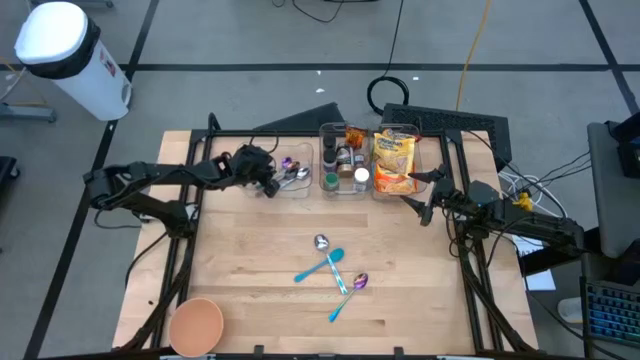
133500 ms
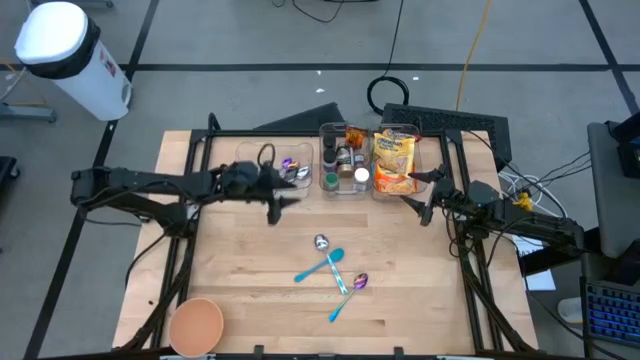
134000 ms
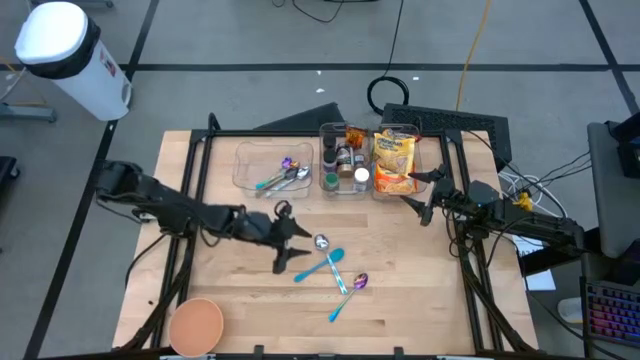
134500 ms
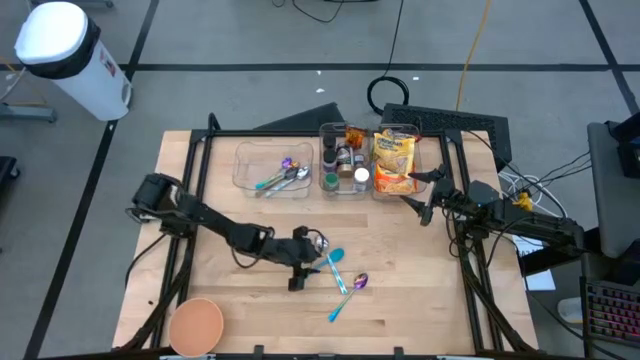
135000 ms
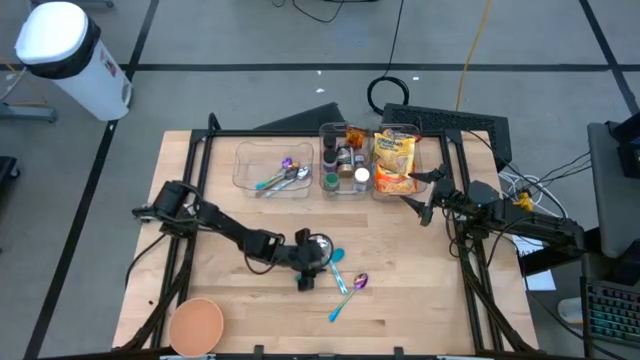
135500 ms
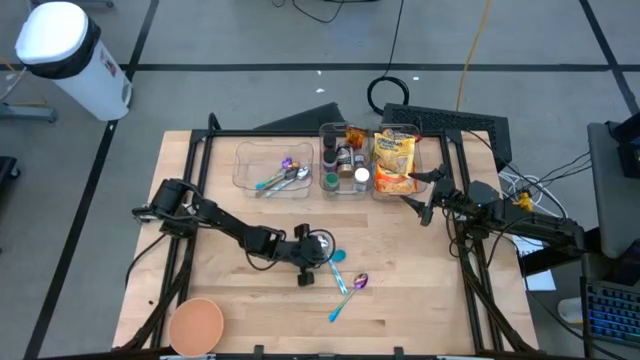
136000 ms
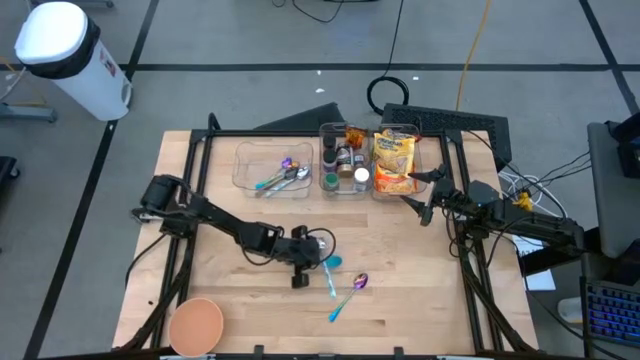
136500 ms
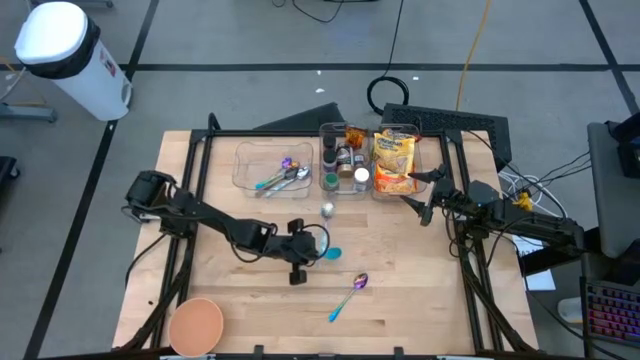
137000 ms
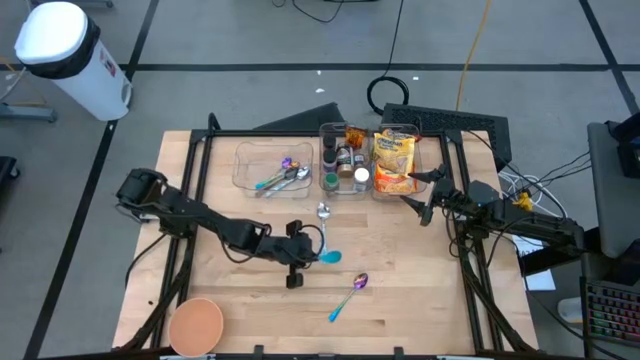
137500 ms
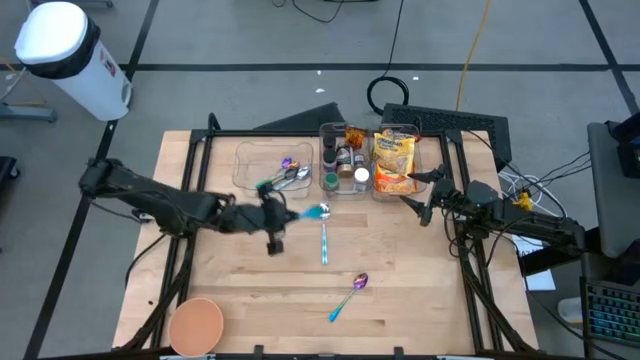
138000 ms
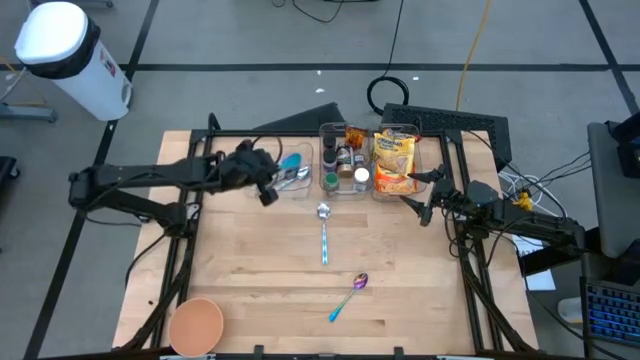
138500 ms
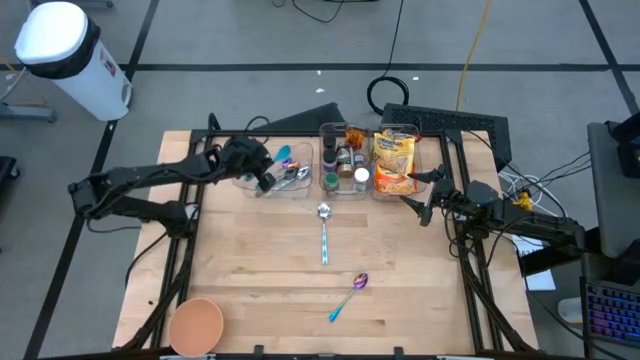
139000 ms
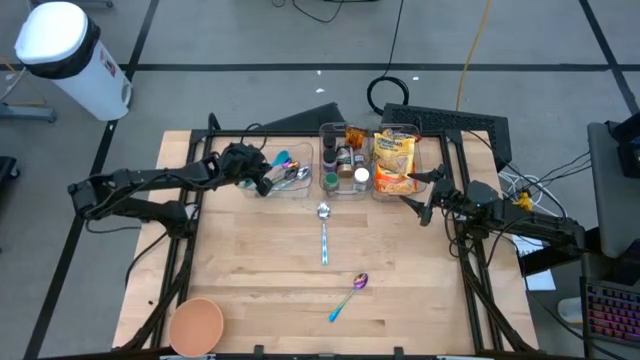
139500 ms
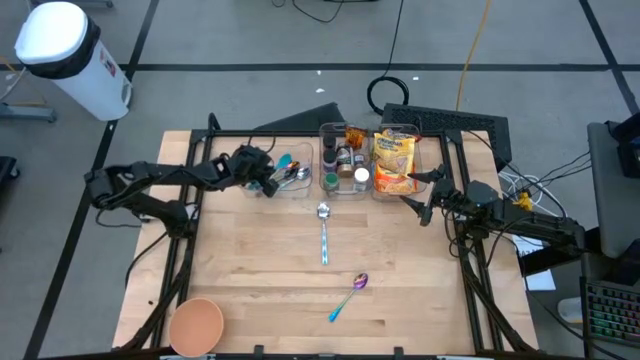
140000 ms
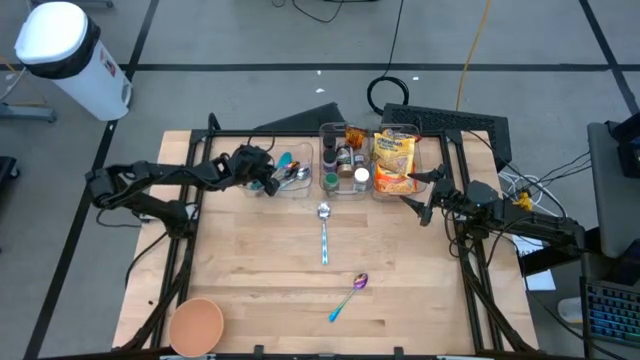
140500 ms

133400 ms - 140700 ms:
Task: Pick & Place Food Item
Put the blue spoon into the left transparent bin

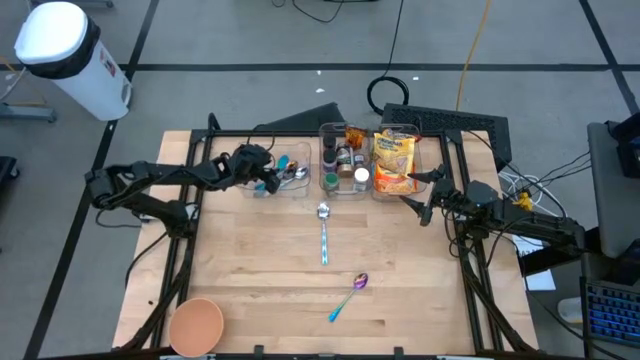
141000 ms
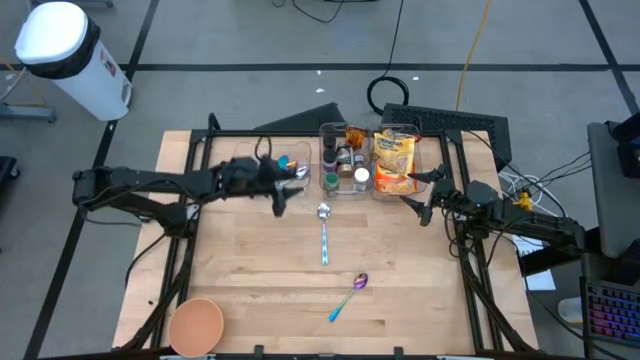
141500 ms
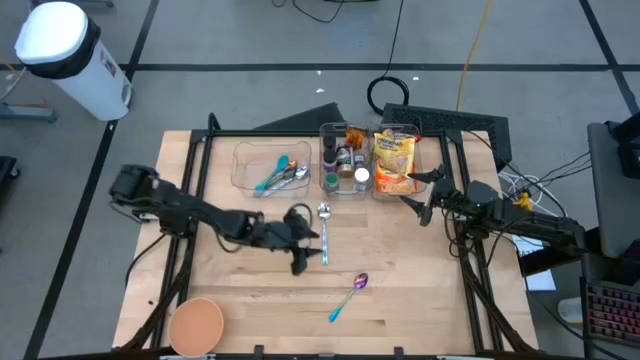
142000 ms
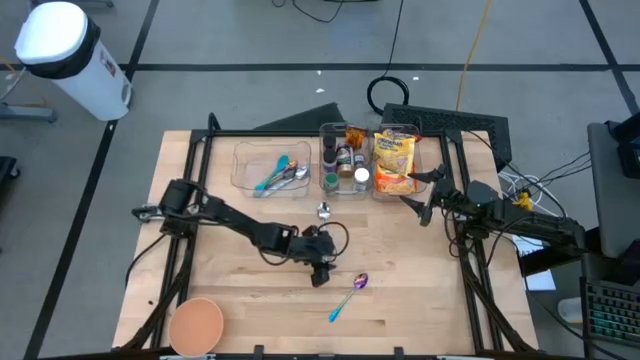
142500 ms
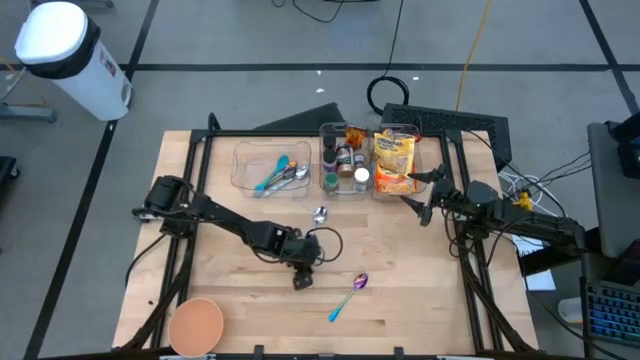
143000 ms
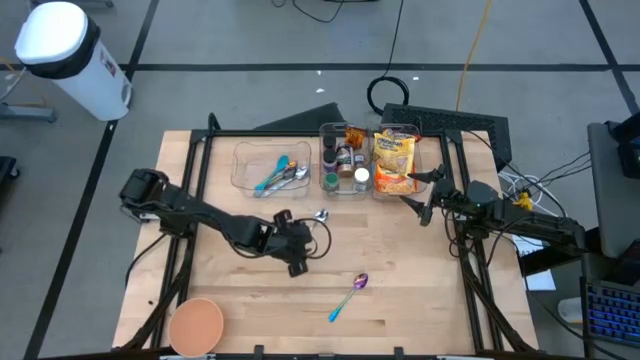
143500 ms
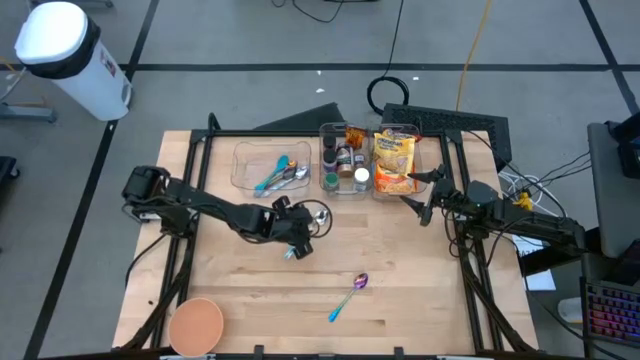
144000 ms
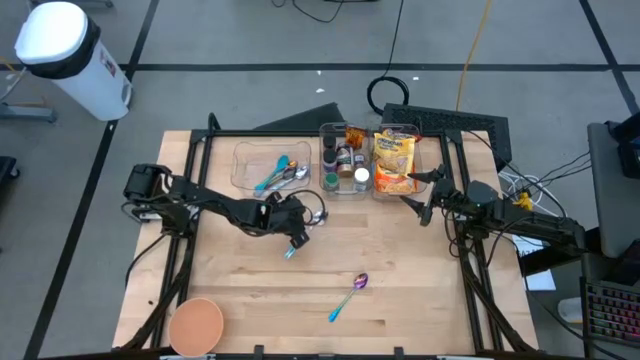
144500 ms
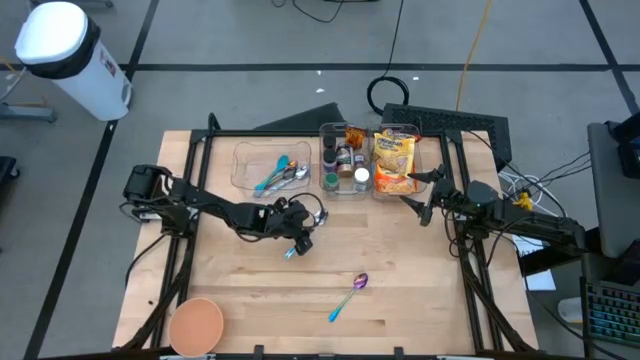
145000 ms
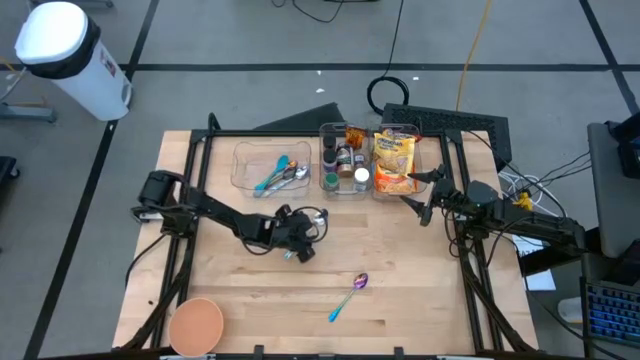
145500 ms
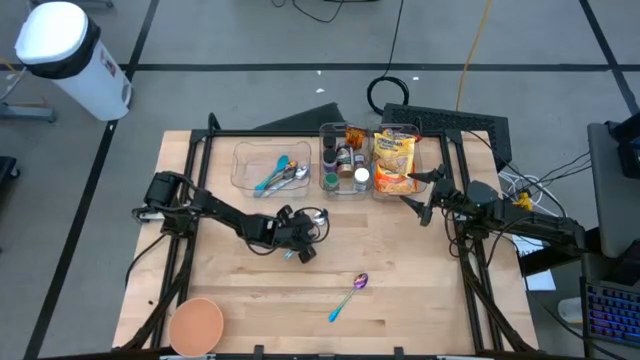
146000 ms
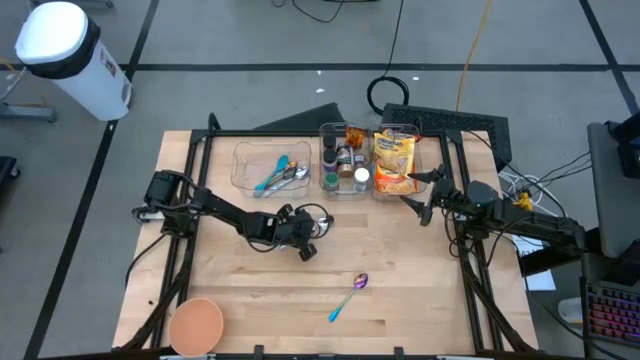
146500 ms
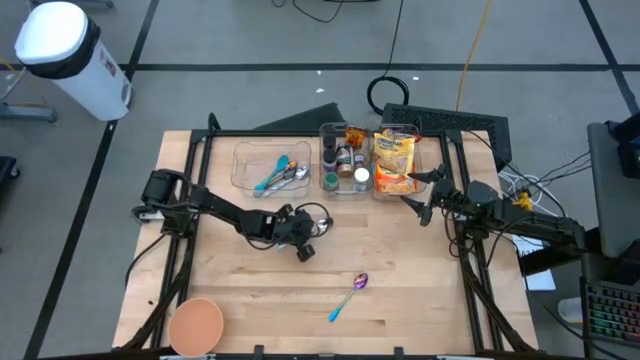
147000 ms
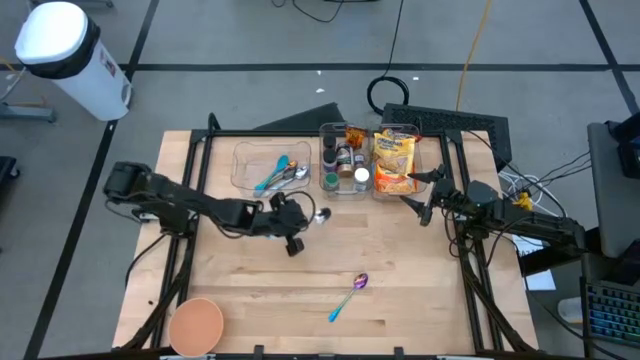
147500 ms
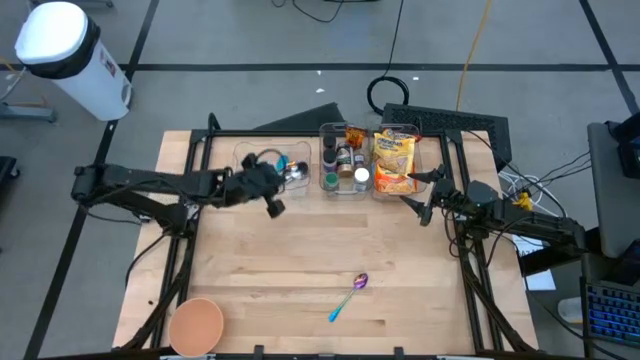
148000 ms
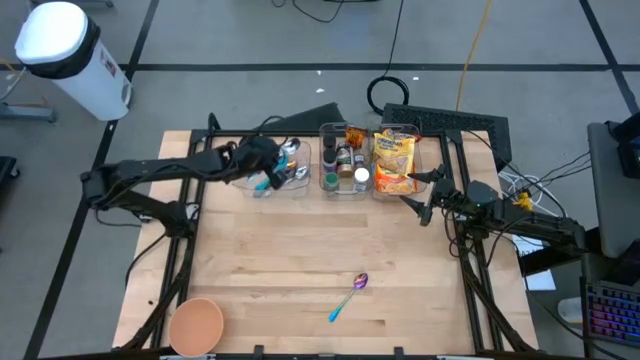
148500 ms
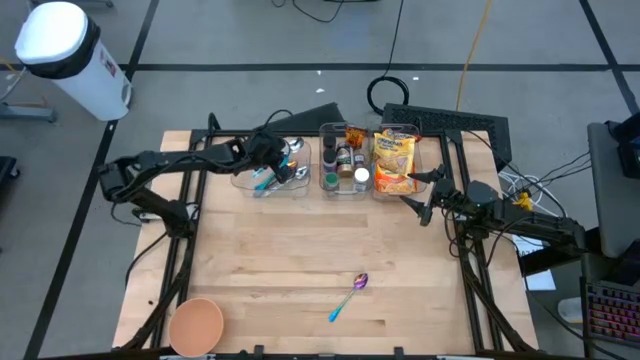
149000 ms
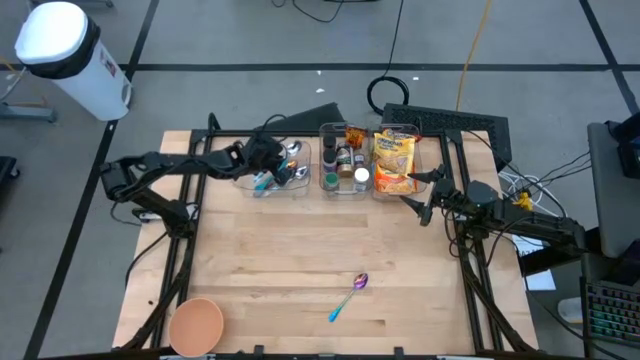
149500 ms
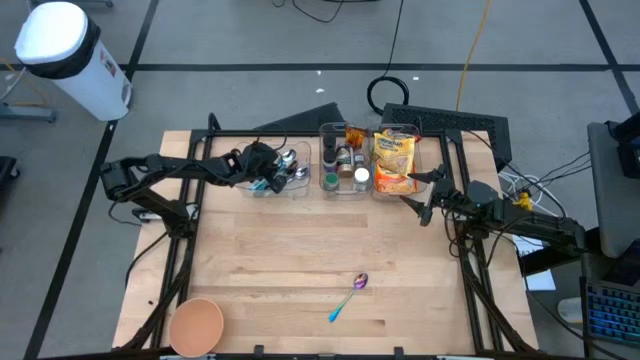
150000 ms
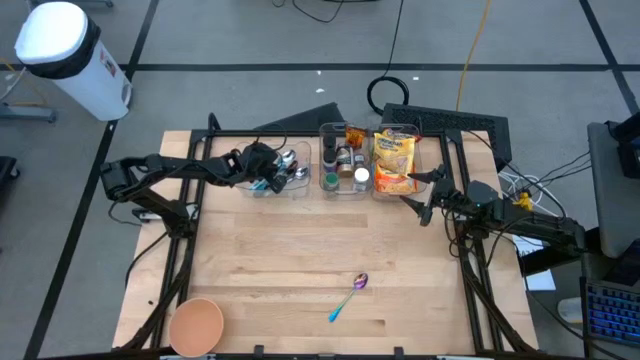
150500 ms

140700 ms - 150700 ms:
Put the blue and white spoon into the left transparent bin

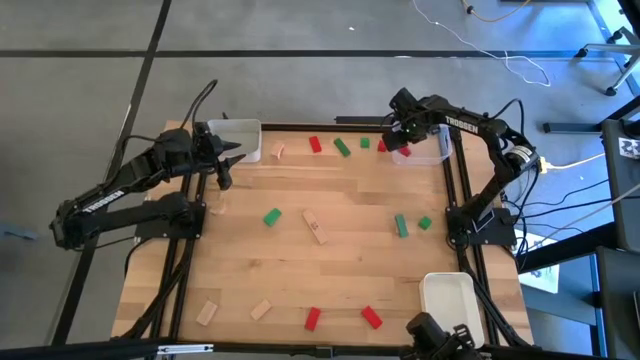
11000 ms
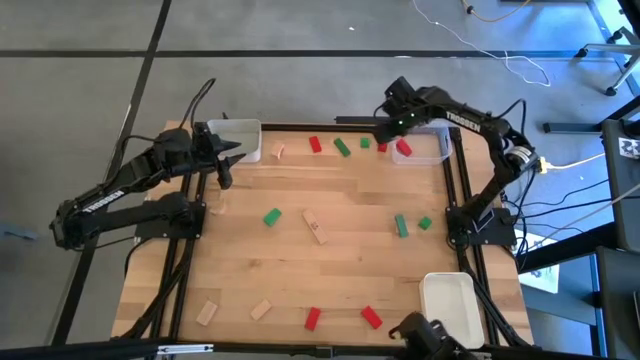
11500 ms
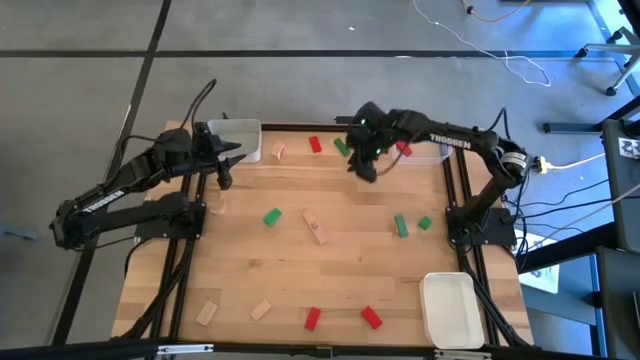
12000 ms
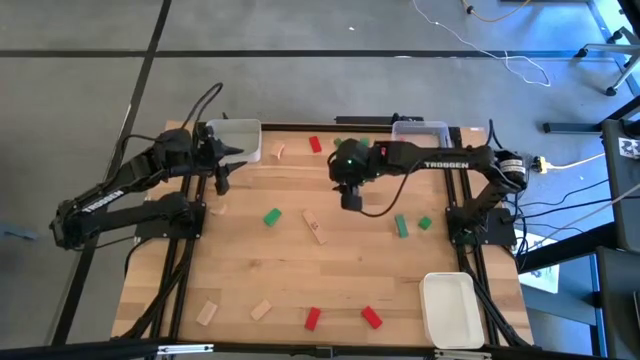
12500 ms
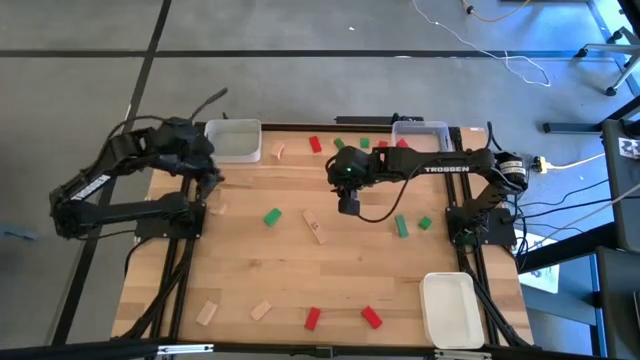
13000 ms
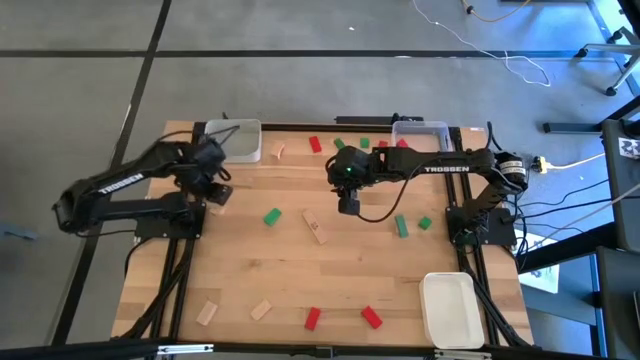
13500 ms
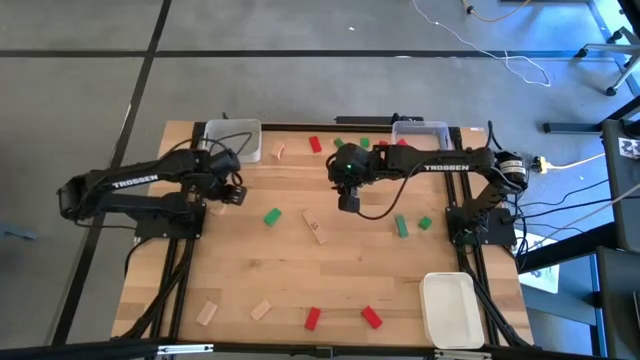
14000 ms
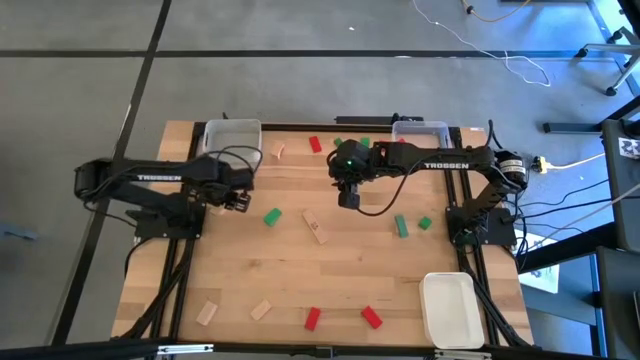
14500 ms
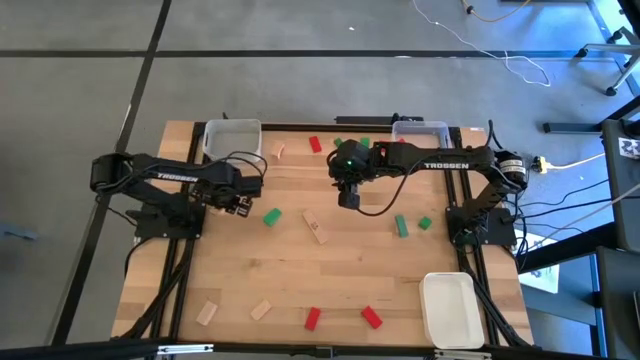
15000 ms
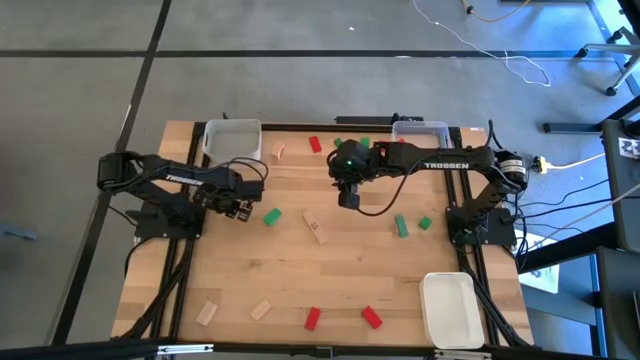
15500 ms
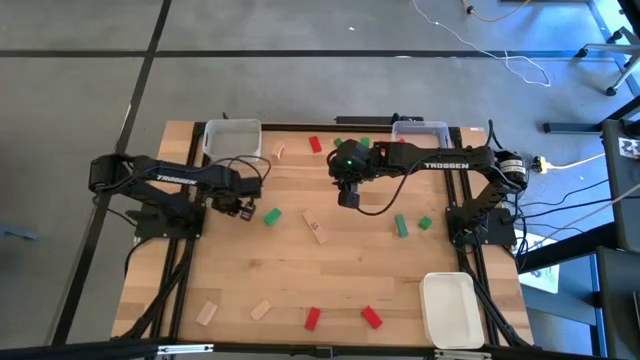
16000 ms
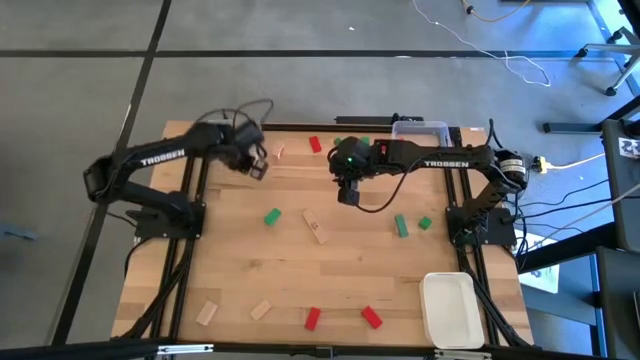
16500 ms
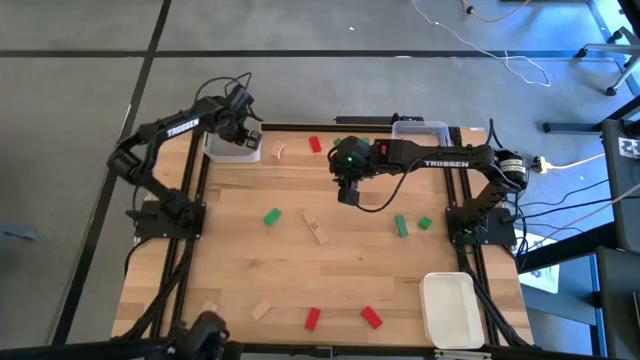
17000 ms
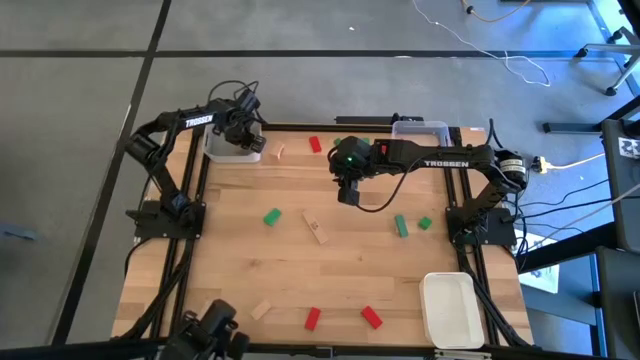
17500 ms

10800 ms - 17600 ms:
Task: Sort & place blocks by color
Put the light brown block into the gray bin
